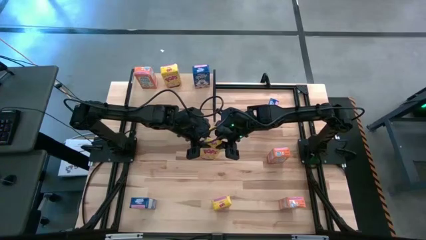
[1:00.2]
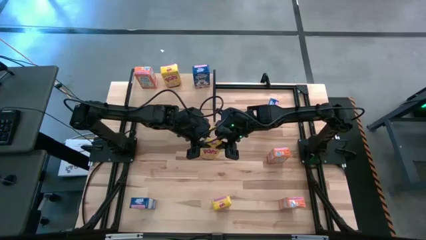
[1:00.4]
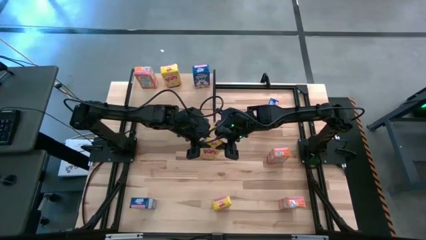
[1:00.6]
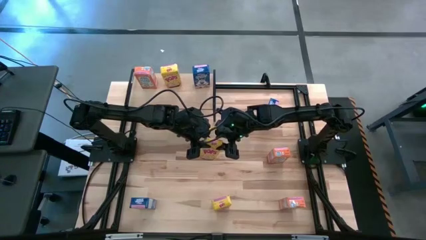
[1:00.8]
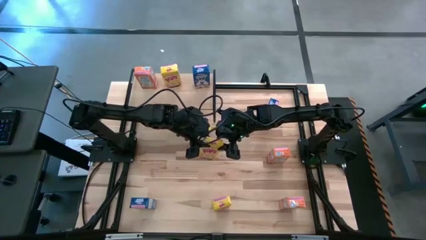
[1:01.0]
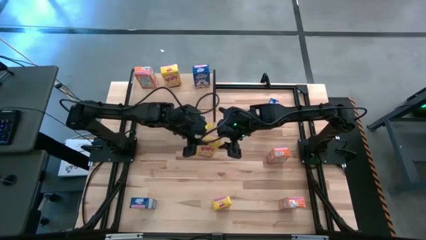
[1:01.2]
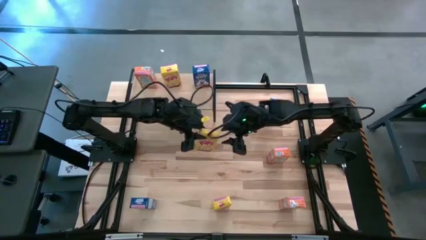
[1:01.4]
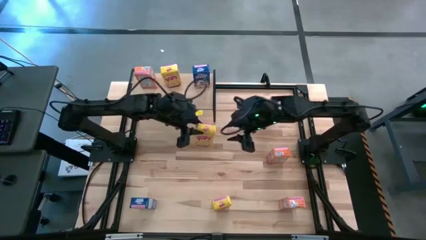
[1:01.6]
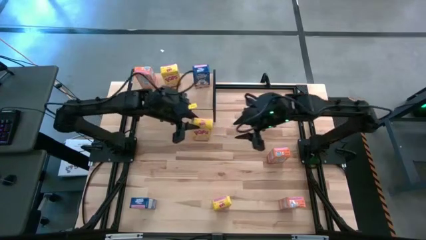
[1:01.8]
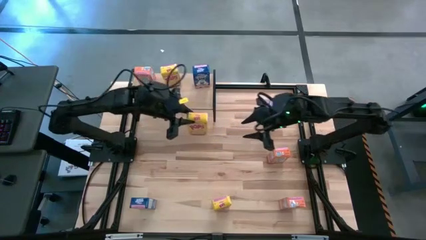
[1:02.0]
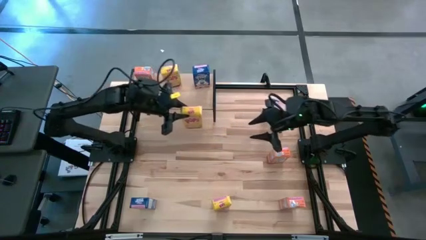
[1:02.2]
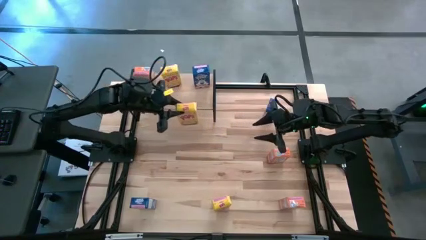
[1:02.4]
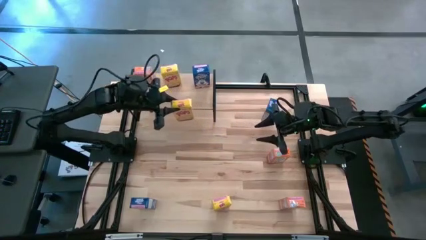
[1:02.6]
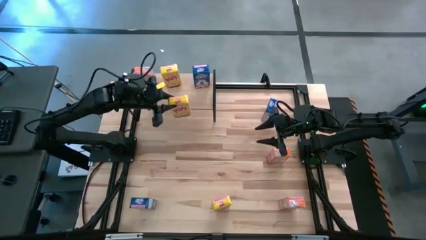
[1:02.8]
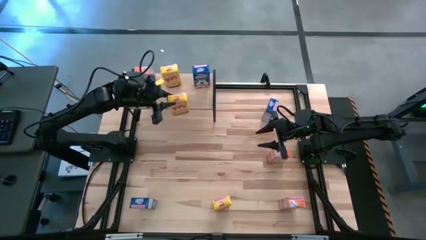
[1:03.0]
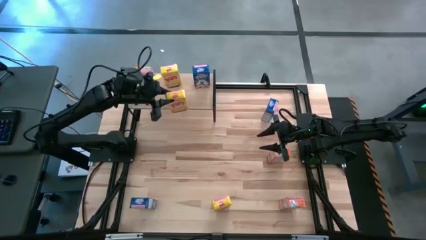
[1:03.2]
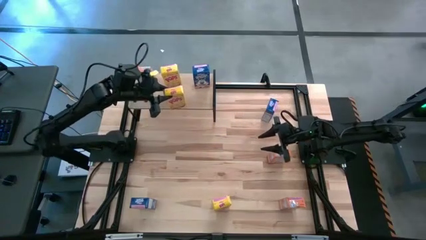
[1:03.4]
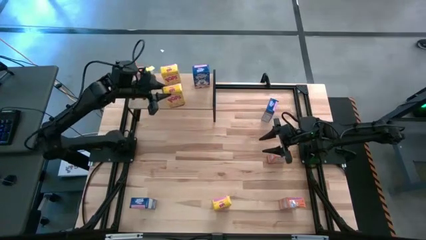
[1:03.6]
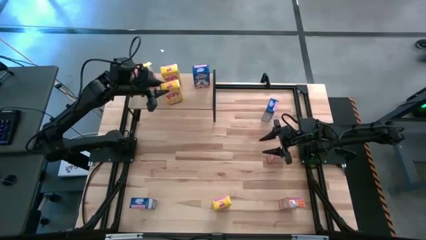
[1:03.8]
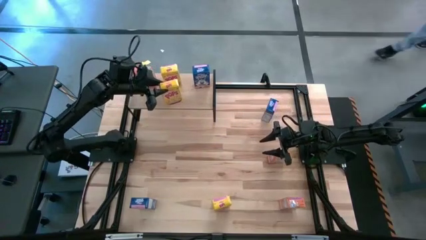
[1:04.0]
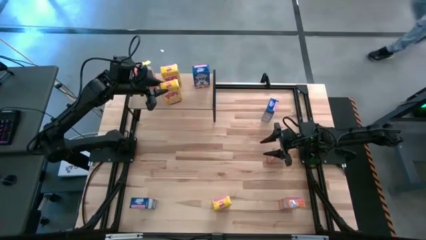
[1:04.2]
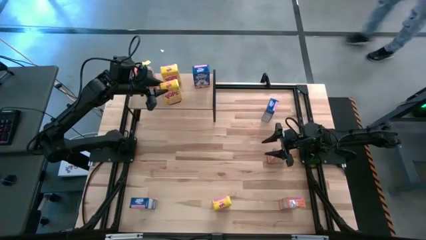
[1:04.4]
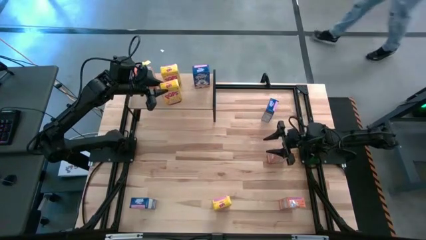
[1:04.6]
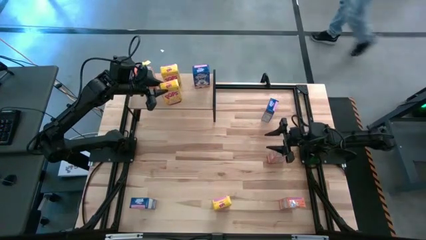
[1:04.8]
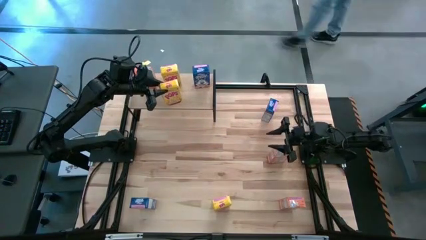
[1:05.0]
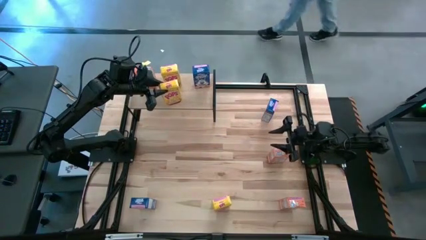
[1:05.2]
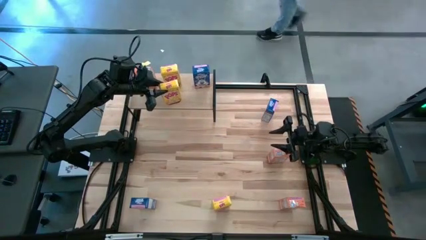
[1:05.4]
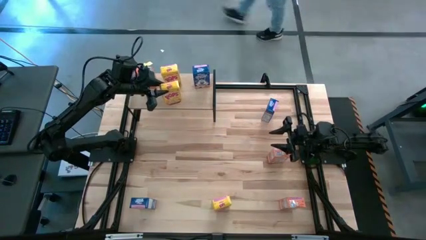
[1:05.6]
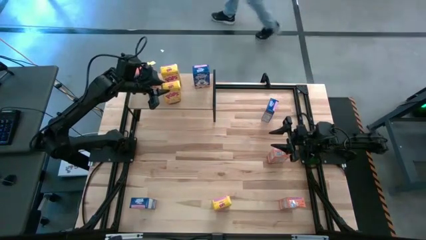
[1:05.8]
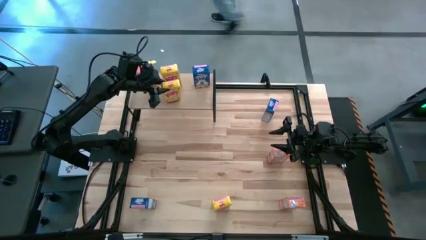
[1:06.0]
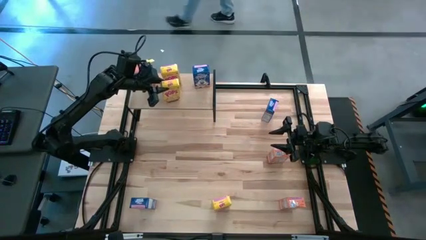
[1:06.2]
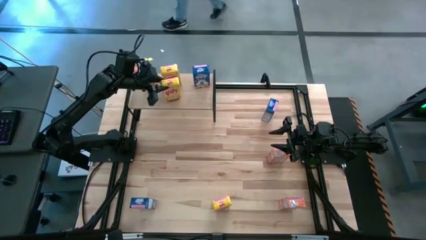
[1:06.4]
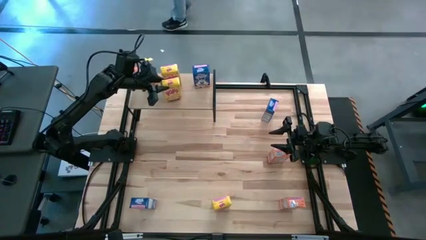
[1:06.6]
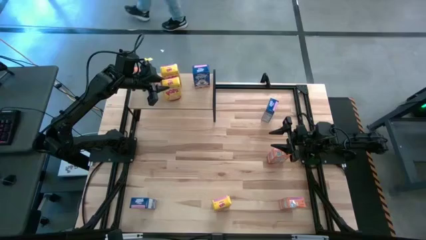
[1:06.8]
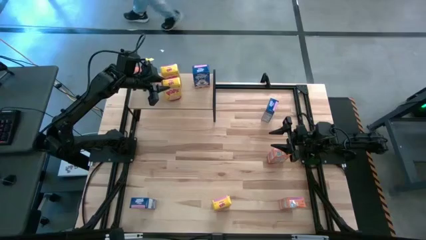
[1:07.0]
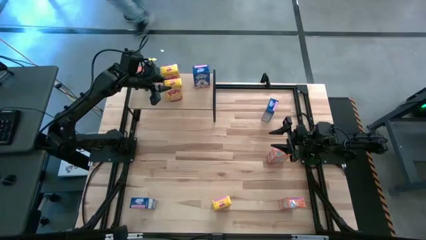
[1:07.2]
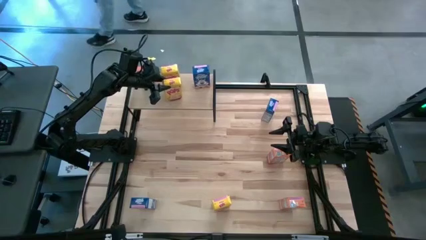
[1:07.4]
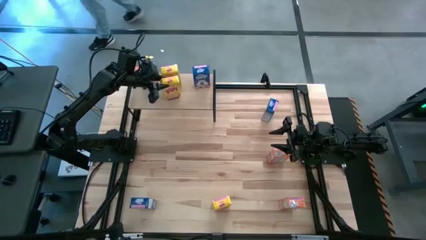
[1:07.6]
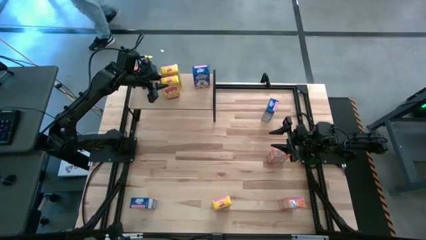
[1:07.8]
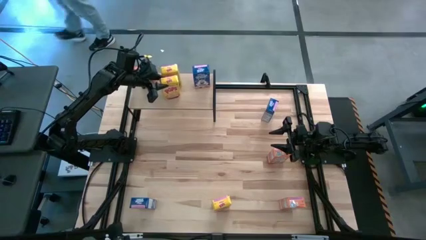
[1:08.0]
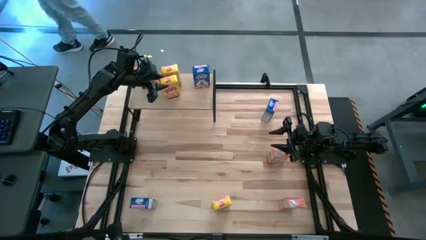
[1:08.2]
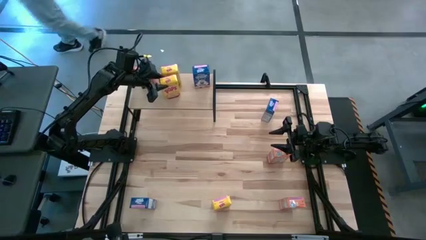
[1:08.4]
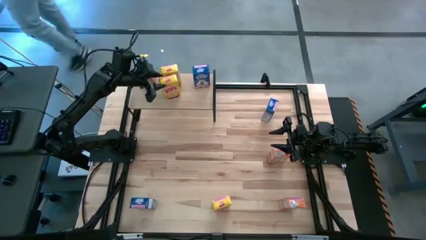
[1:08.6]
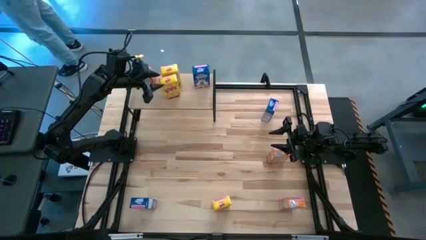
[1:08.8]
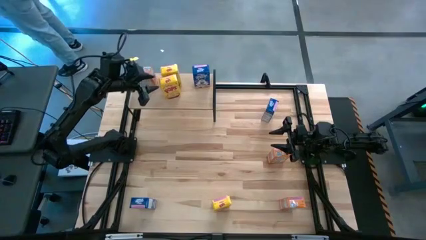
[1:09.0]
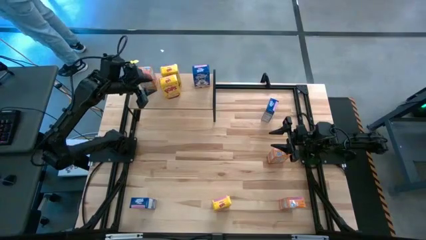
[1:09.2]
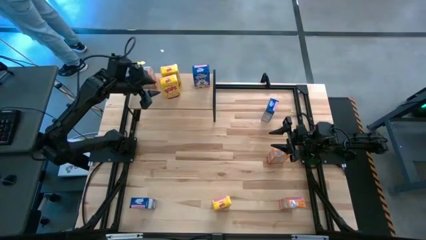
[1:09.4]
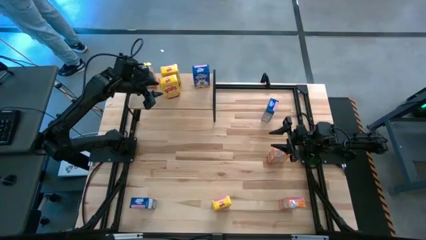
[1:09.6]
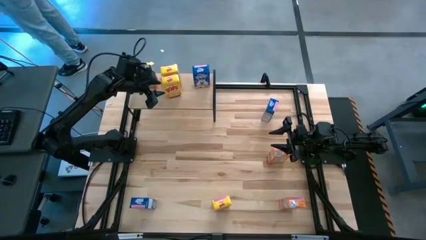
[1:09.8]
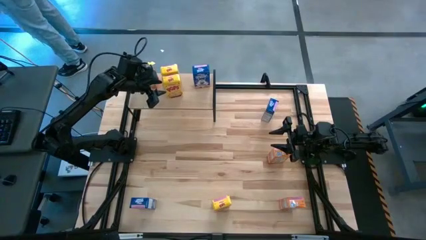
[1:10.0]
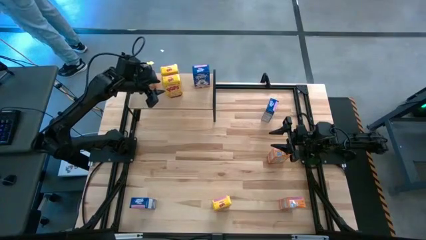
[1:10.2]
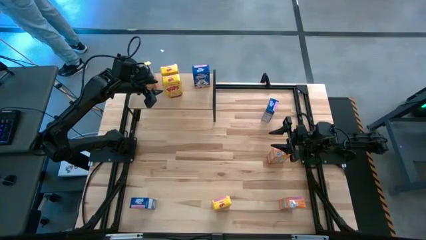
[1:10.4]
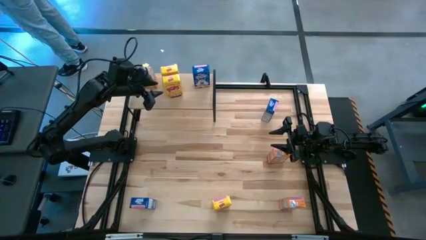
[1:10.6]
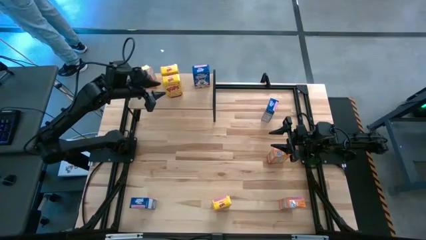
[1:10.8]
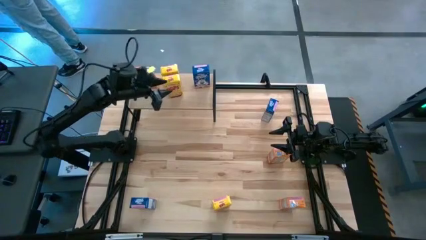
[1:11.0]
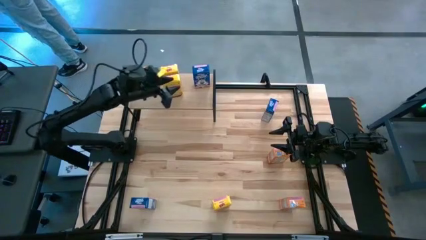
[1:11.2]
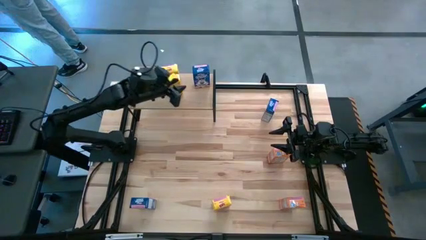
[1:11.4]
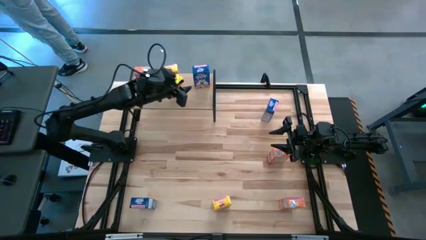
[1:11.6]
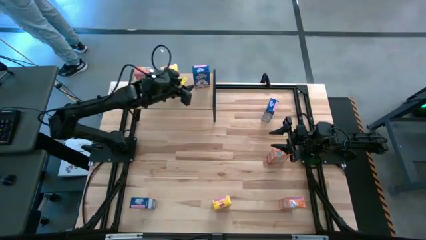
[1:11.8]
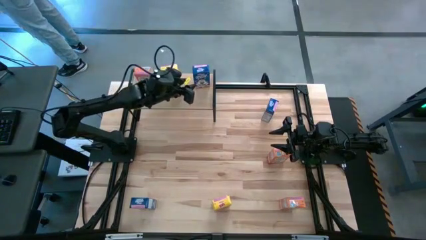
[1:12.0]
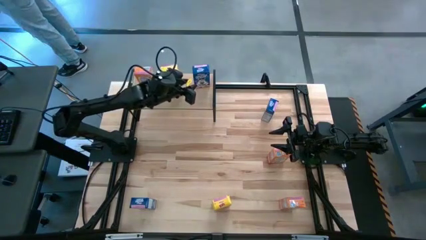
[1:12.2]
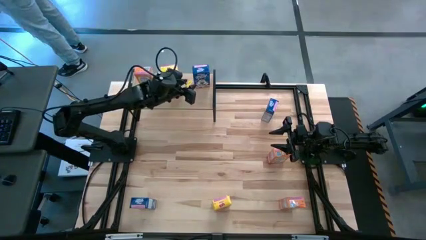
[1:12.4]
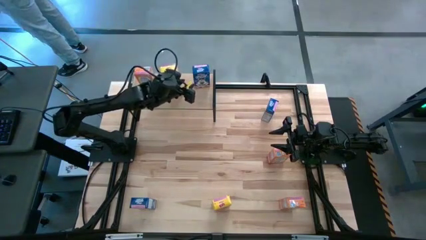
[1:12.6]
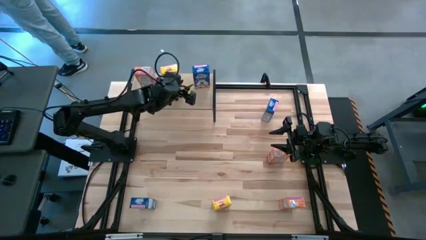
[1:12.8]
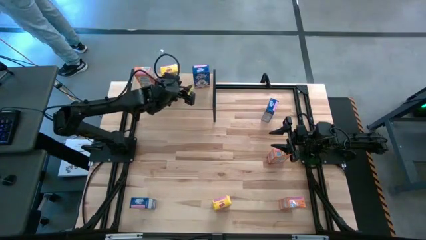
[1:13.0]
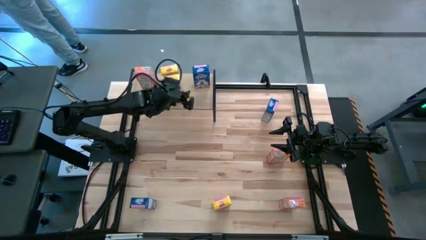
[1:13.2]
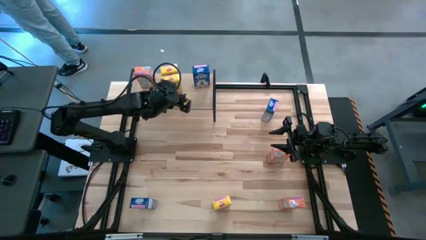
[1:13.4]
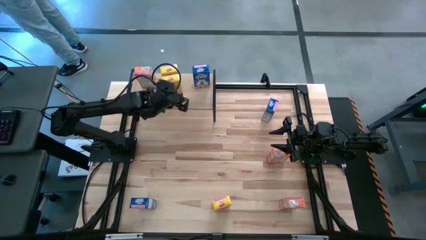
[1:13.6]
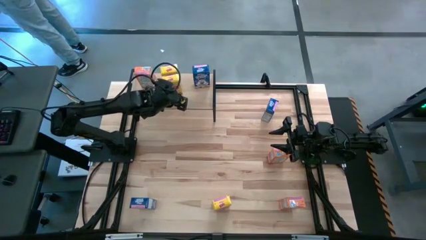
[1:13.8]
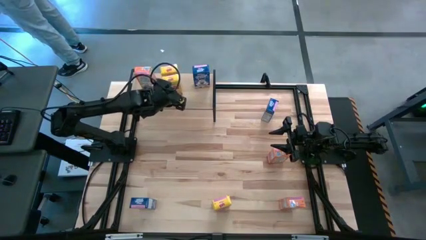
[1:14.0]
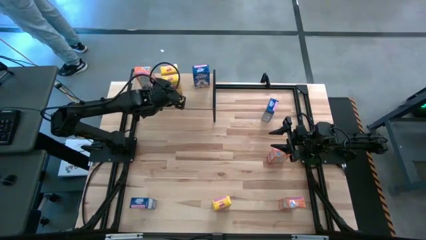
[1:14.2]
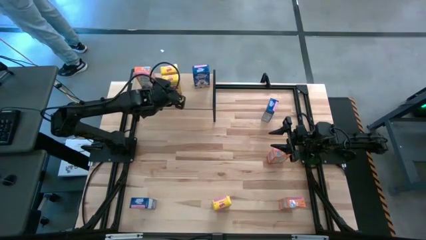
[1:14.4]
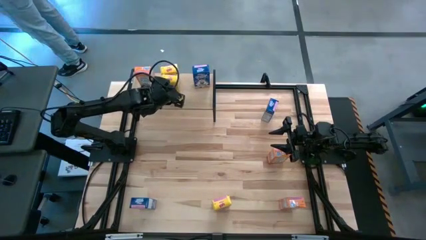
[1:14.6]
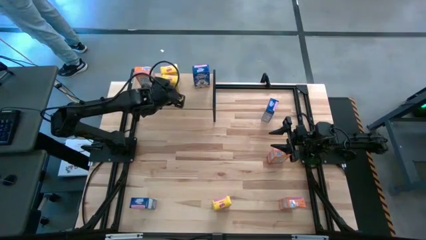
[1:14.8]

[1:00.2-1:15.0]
Task: Stack cereal on shelf
Put the top yellow cereal box on the shelf aligned with the other yellow cereal box
